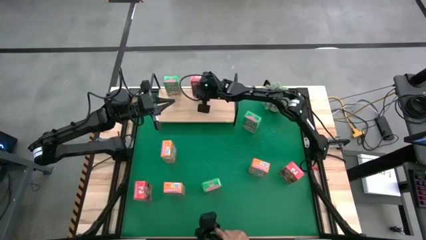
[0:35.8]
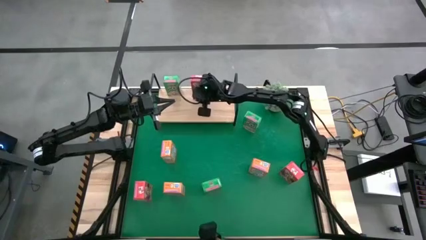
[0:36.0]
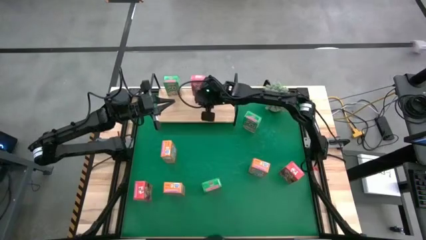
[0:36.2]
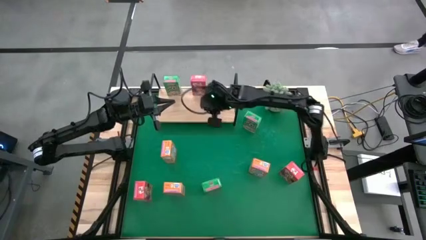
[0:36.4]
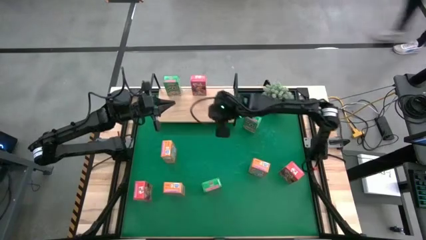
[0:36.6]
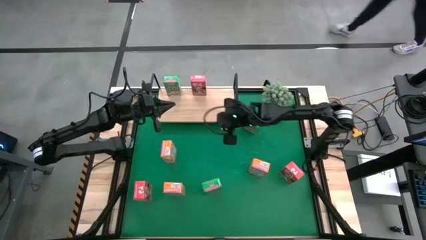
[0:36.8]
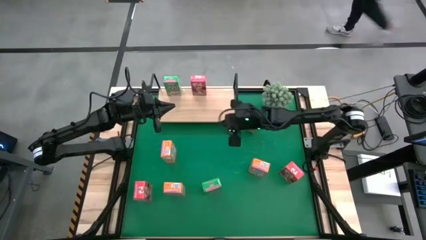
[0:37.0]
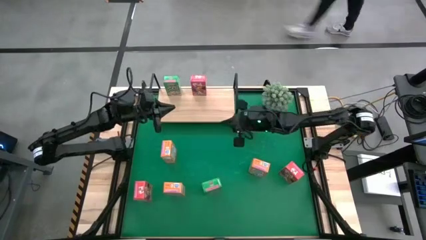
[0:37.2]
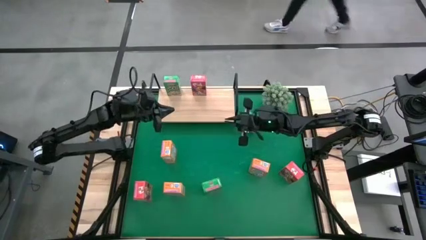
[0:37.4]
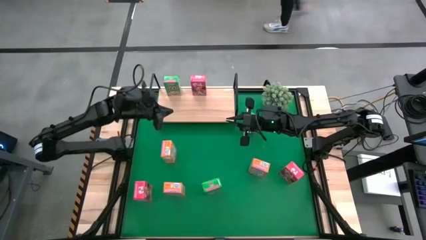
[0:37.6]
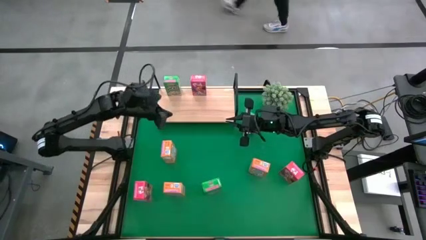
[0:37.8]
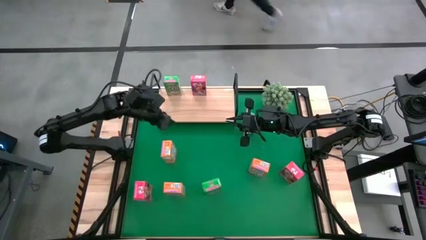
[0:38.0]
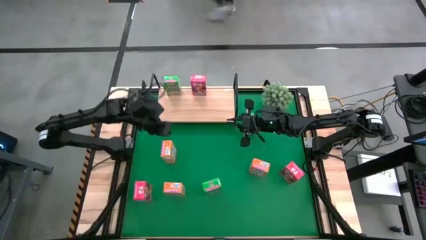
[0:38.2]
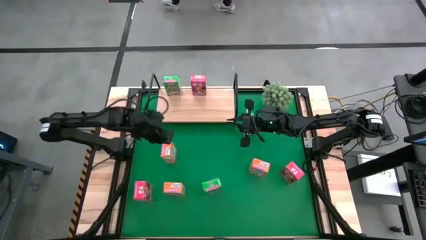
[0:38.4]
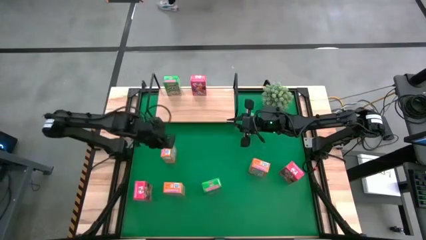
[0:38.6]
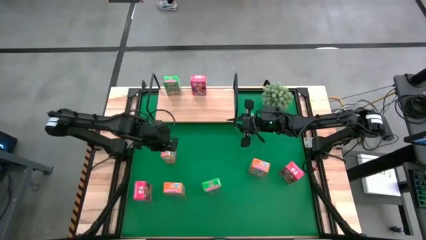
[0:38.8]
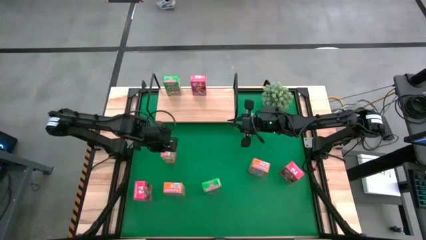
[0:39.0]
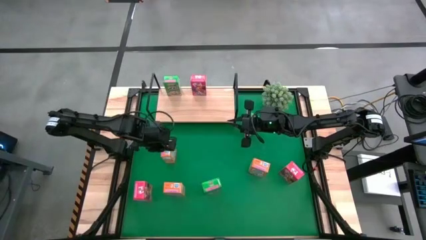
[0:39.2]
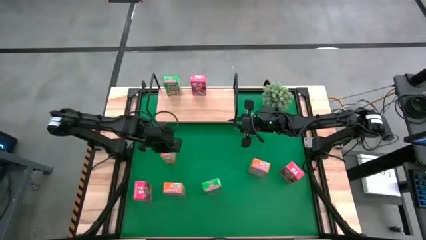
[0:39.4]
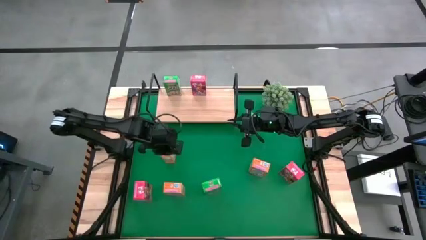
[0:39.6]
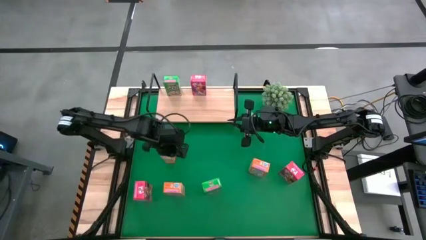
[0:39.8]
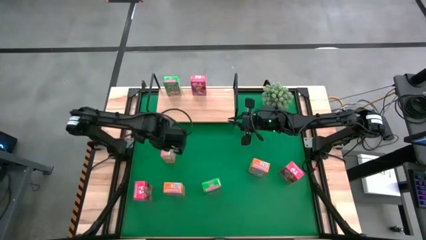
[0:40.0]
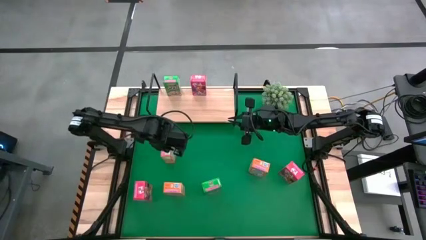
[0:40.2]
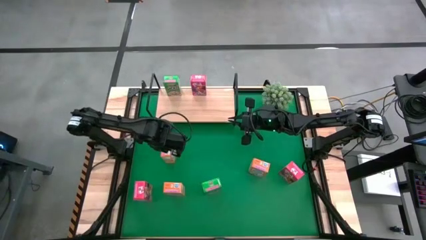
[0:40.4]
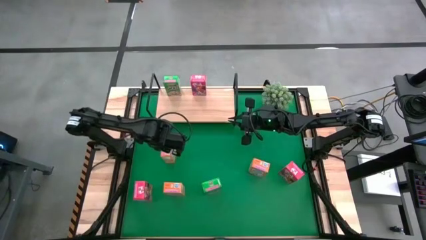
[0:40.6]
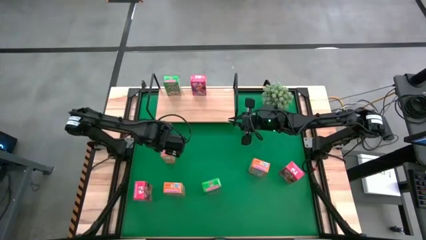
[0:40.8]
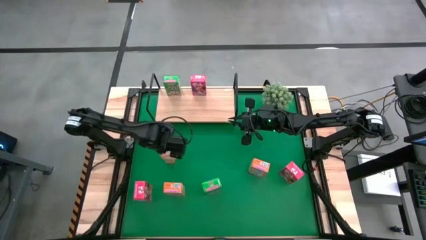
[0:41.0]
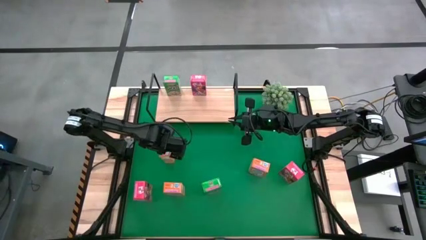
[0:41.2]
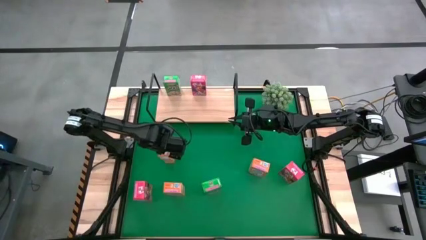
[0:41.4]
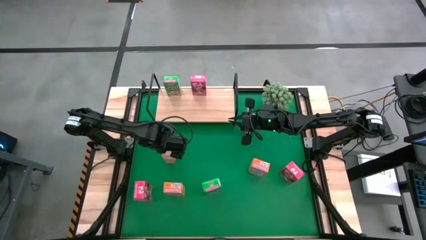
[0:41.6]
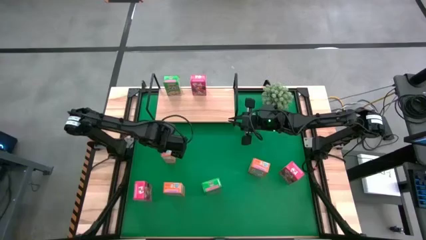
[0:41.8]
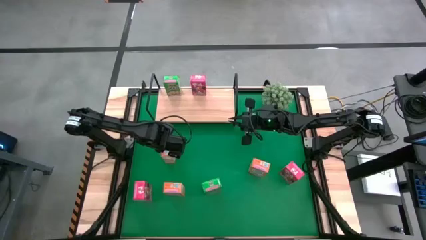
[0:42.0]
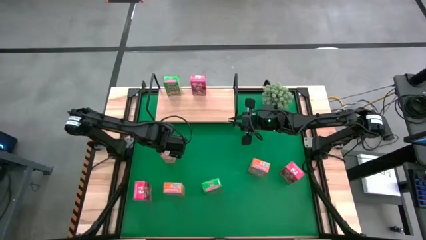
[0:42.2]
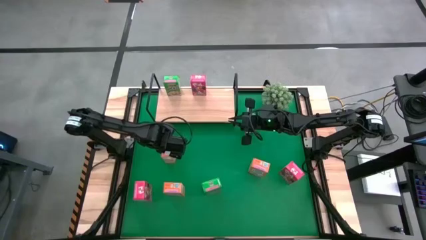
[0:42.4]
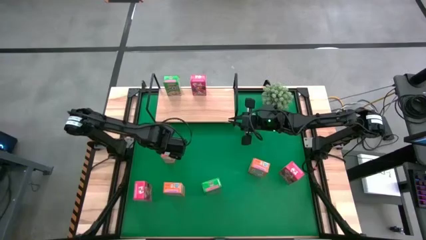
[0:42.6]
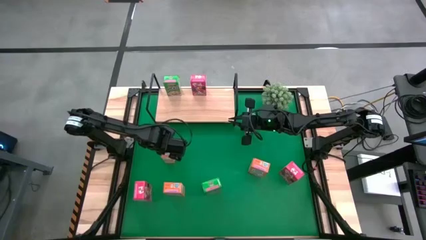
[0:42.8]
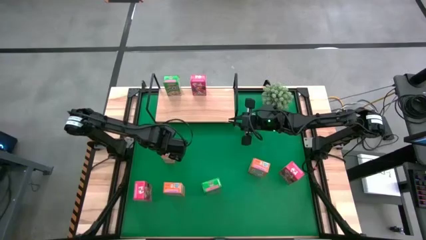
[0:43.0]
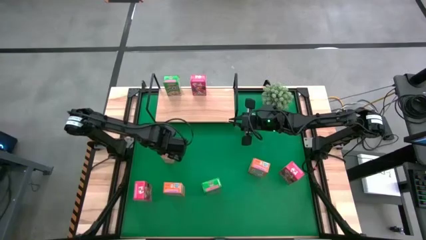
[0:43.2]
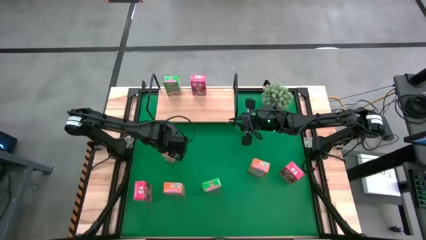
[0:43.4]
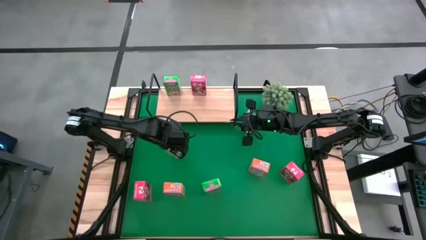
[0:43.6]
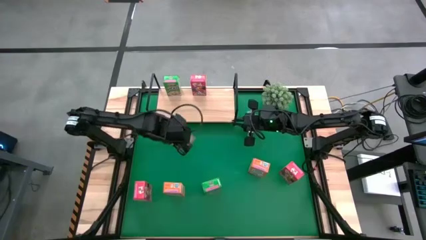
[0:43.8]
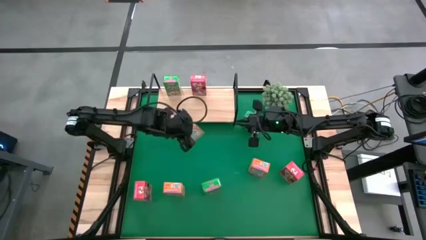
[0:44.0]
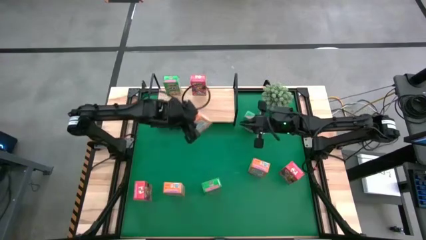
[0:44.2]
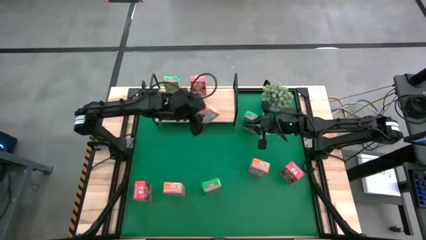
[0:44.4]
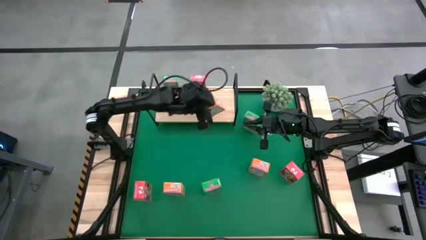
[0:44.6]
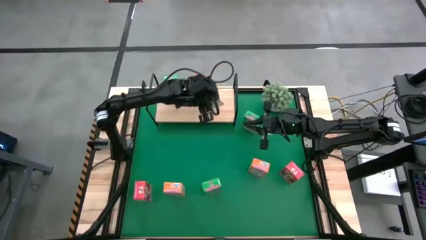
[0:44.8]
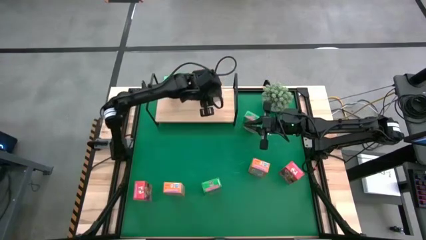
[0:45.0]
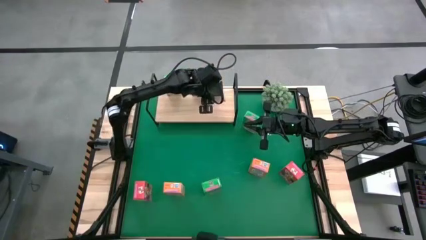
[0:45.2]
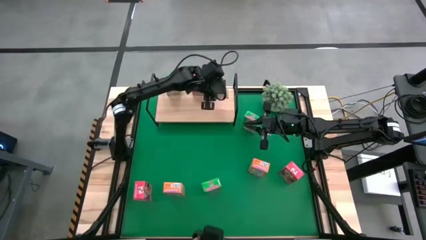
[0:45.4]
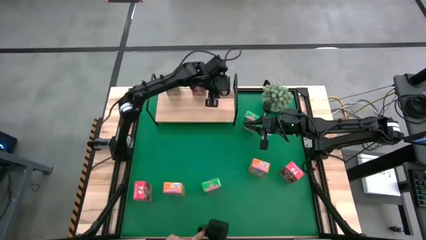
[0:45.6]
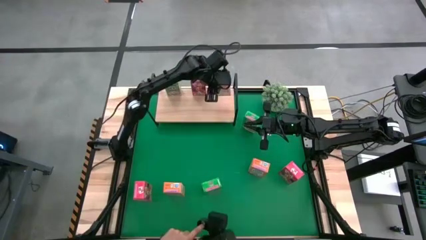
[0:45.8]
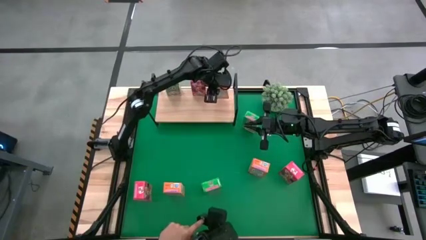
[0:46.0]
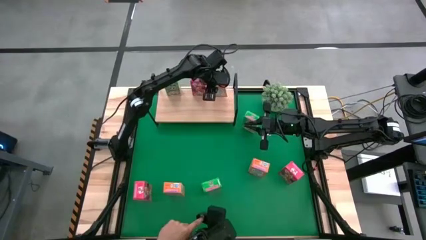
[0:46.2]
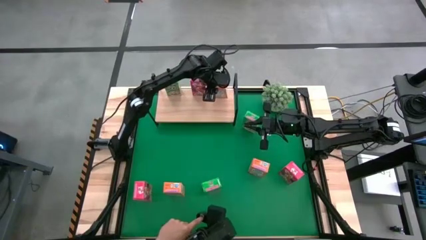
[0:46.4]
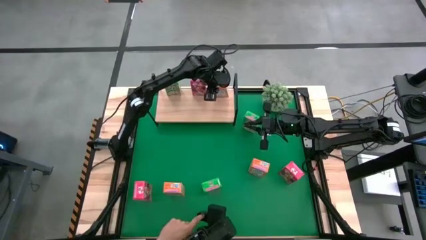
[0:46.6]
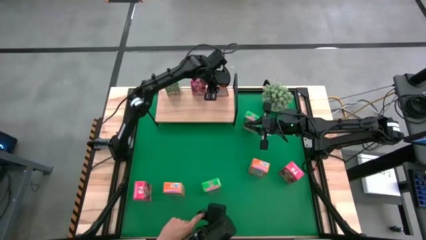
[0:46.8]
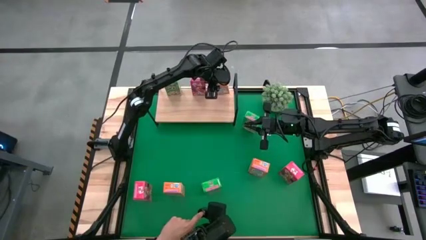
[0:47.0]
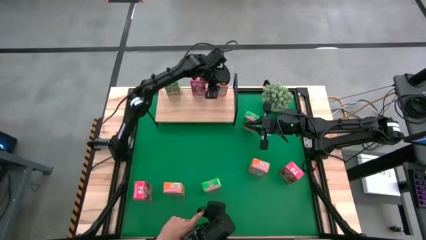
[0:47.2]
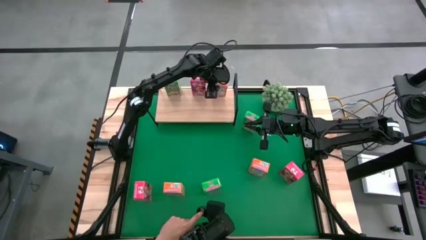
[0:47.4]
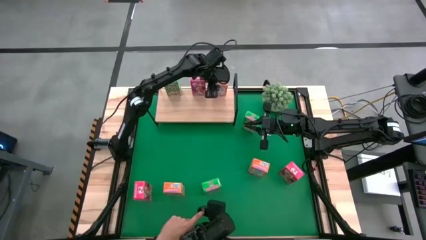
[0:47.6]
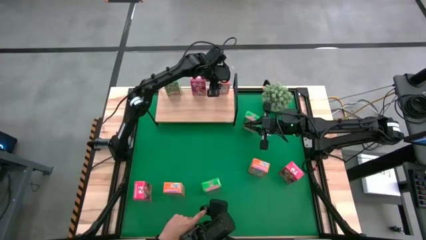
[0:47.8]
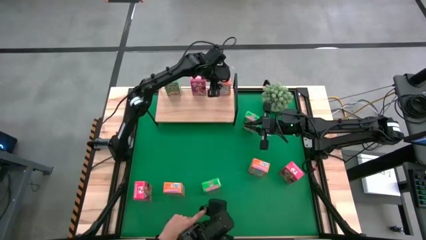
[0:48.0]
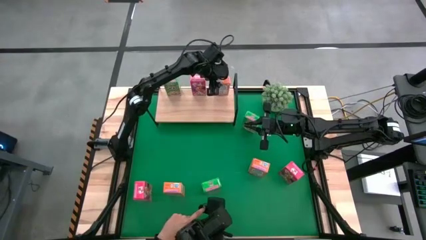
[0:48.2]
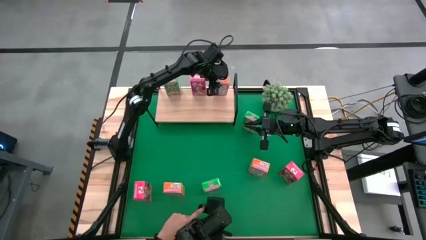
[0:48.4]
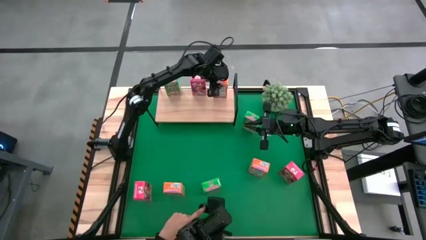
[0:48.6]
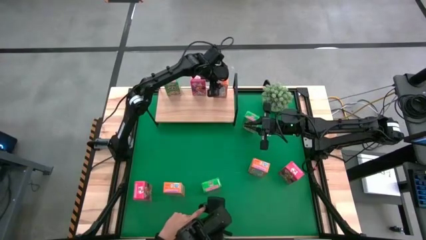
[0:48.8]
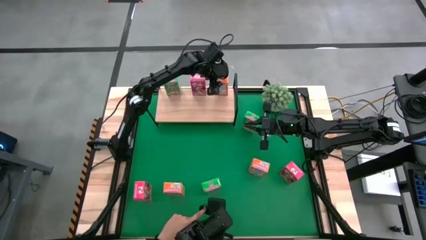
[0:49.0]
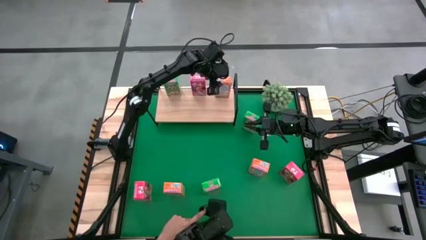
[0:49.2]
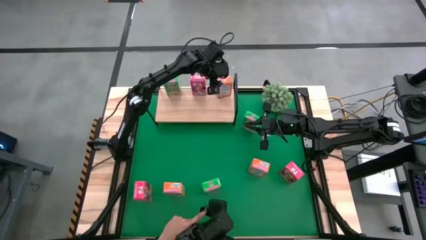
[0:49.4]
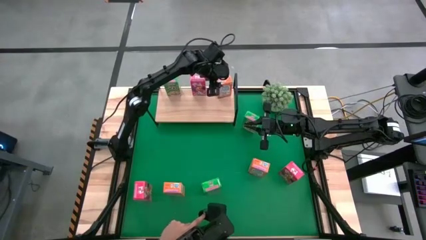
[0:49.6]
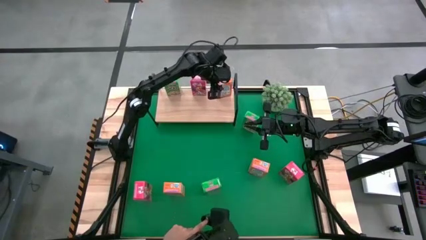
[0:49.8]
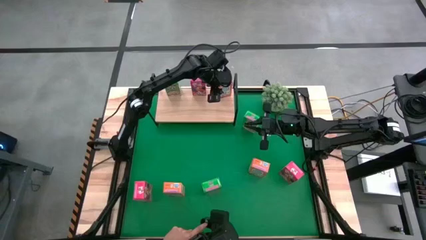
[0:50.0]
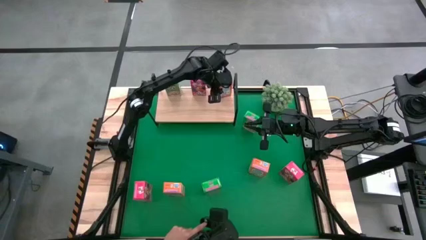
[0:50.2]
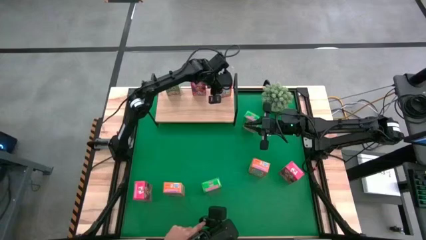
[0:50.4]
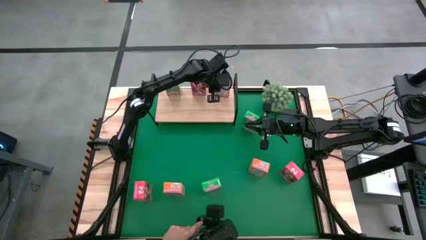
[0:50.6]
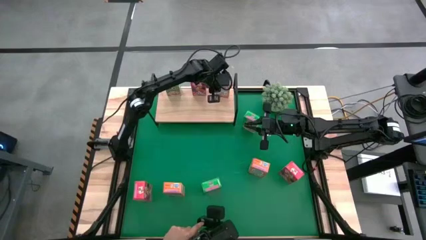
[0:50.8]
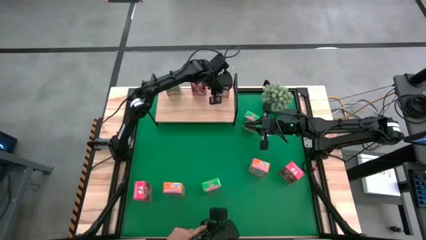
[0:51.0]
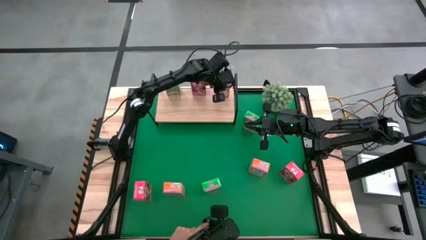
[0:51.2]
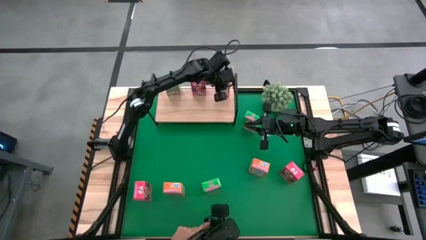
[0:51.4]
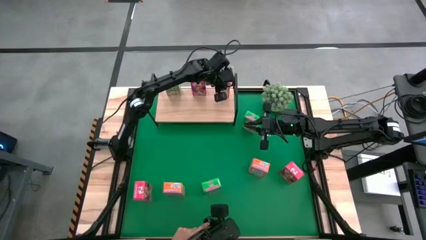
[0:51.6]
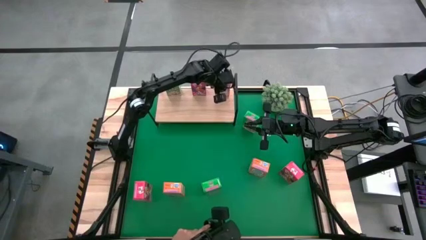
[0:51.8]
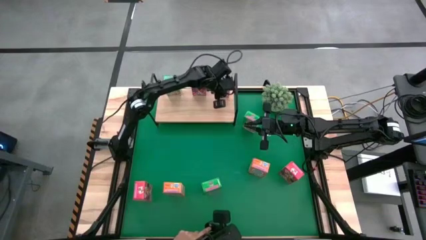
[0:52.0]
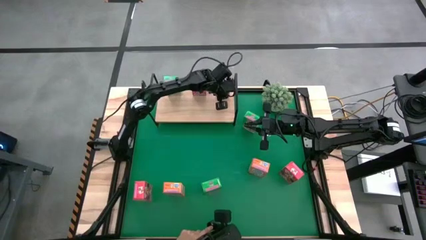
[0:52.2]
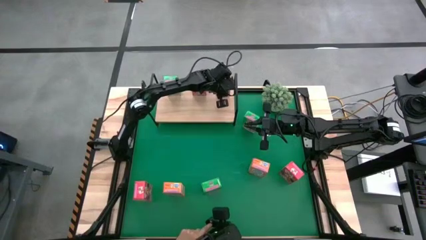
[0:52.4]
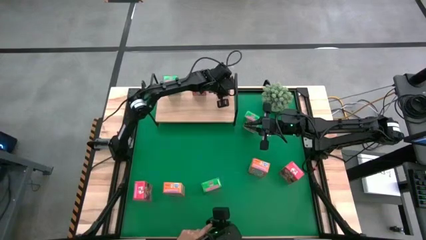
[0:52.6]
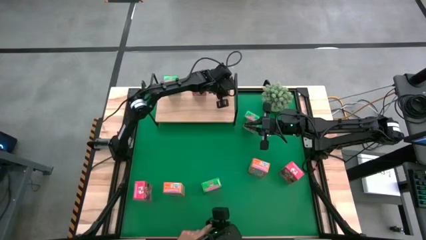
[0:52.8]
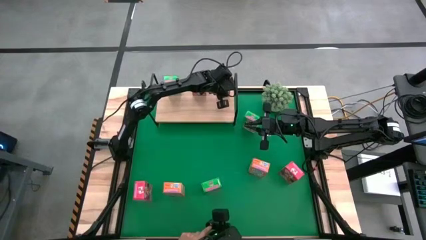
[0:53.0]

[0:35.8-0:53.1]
Task: Stack cereal on shelf
Put the top left orange cereal box on the shelf
